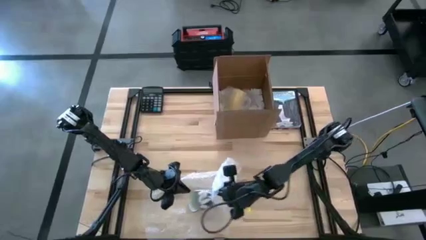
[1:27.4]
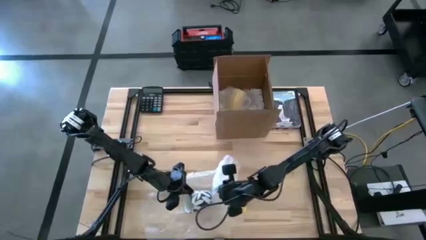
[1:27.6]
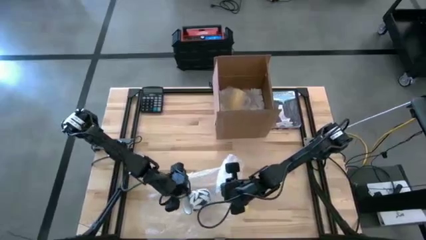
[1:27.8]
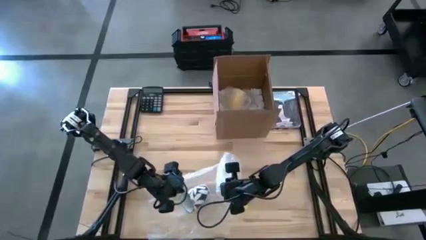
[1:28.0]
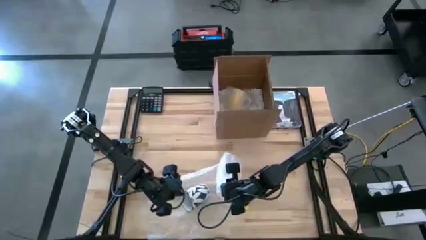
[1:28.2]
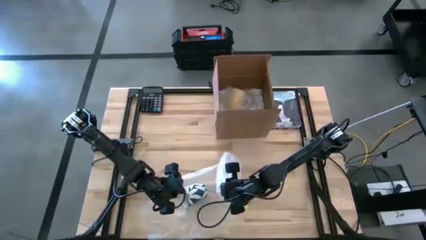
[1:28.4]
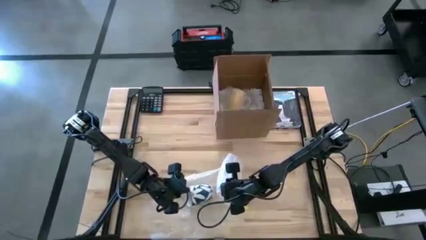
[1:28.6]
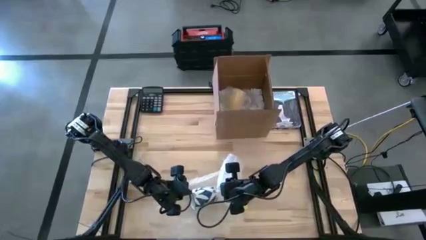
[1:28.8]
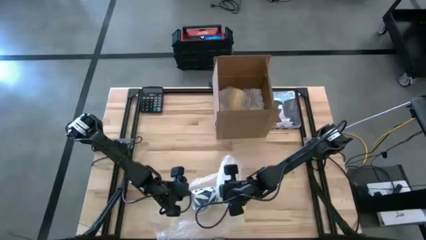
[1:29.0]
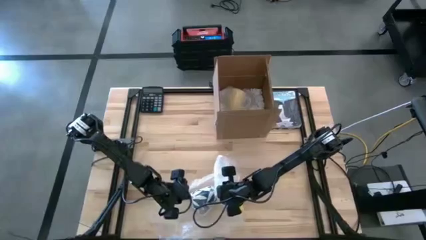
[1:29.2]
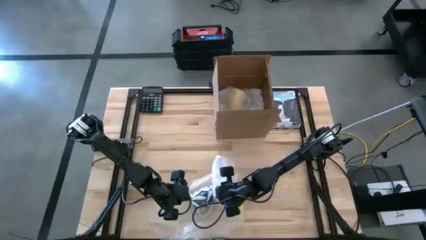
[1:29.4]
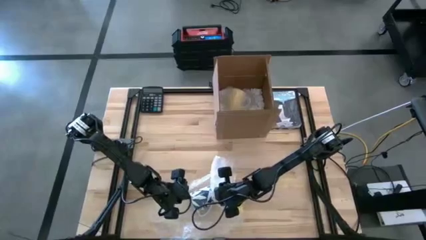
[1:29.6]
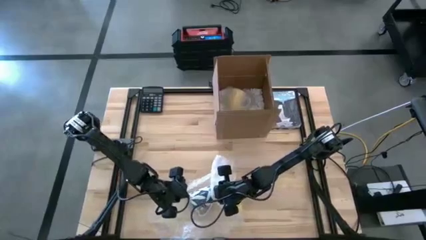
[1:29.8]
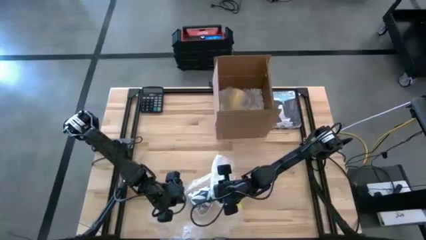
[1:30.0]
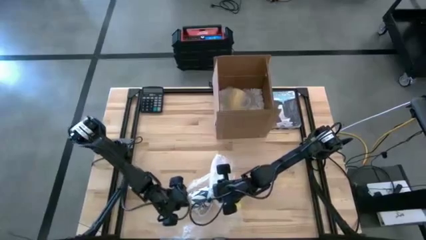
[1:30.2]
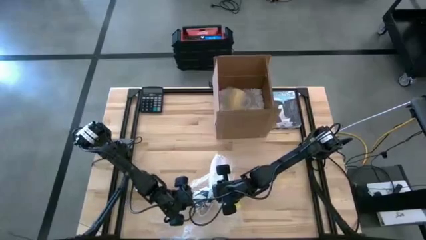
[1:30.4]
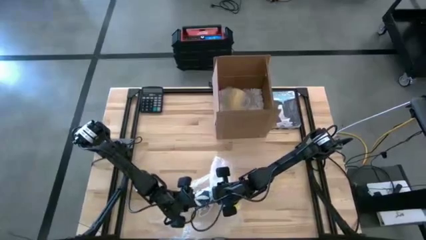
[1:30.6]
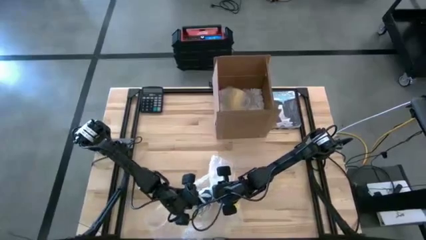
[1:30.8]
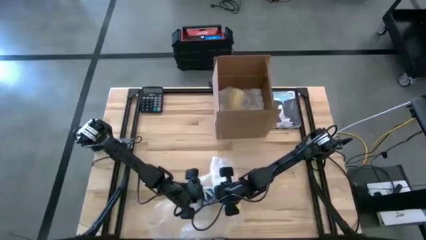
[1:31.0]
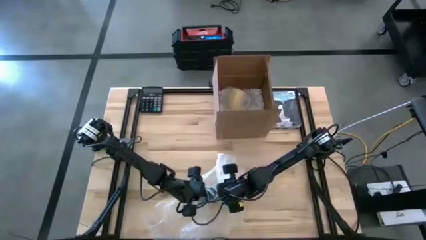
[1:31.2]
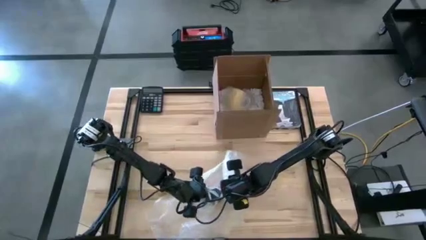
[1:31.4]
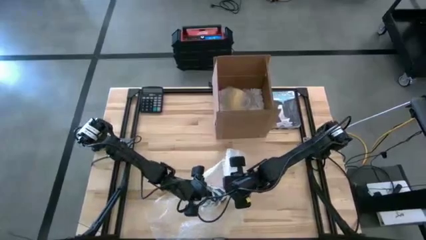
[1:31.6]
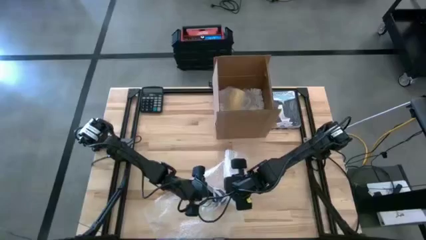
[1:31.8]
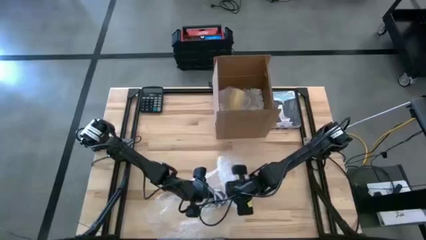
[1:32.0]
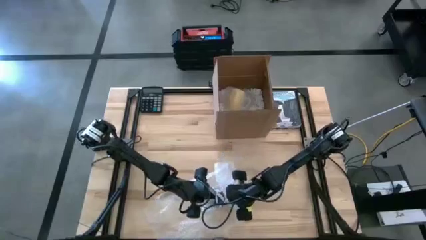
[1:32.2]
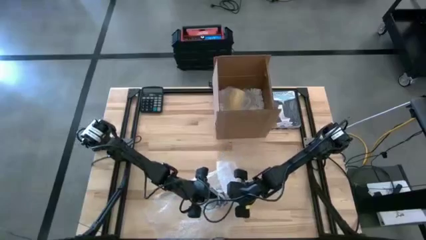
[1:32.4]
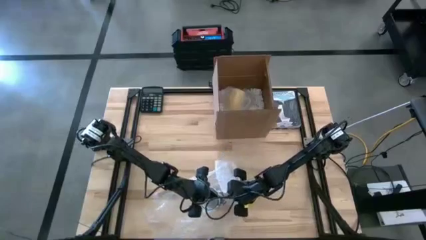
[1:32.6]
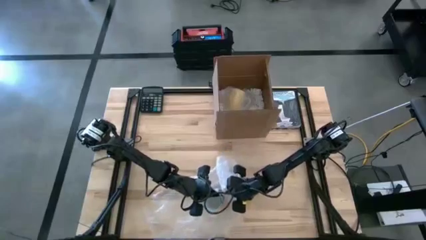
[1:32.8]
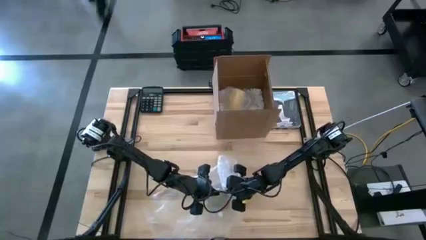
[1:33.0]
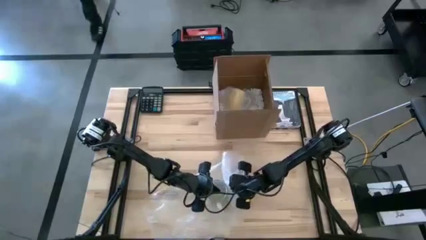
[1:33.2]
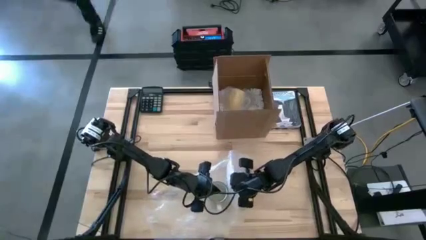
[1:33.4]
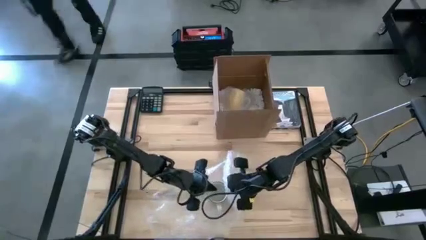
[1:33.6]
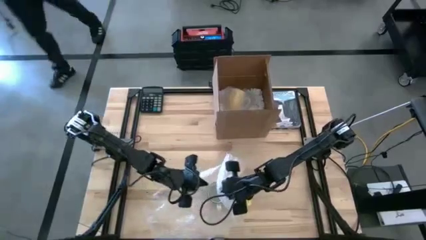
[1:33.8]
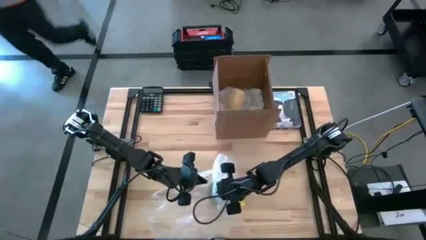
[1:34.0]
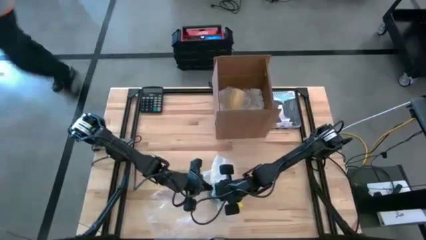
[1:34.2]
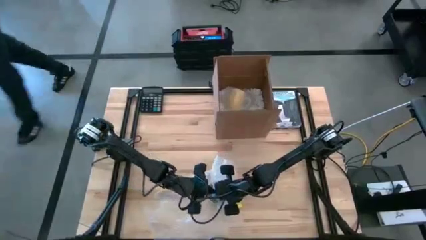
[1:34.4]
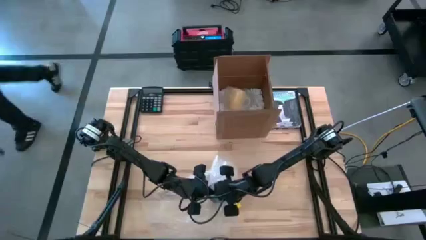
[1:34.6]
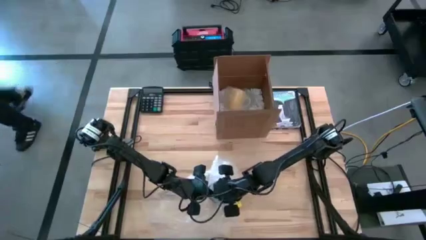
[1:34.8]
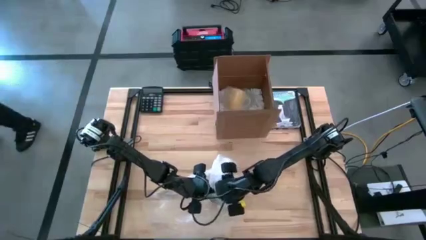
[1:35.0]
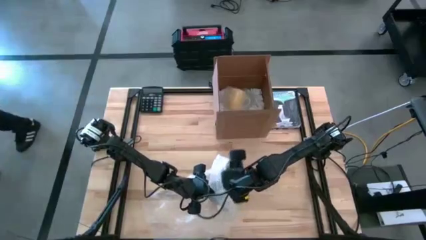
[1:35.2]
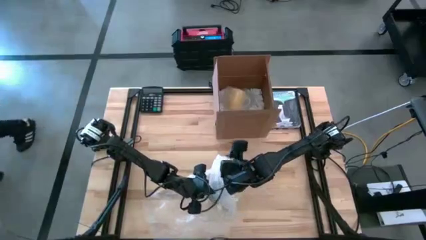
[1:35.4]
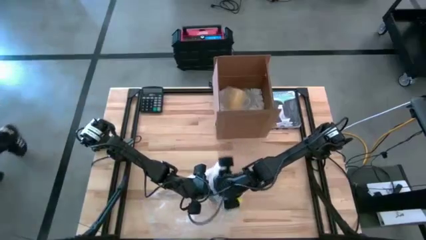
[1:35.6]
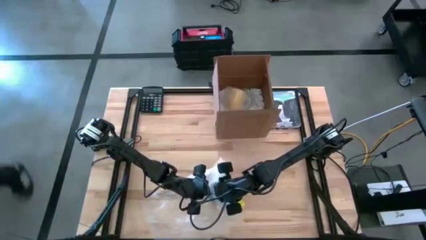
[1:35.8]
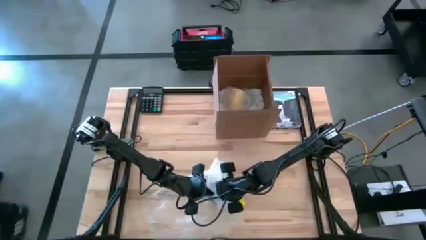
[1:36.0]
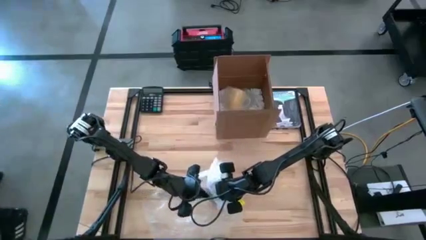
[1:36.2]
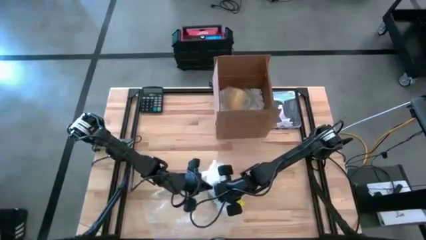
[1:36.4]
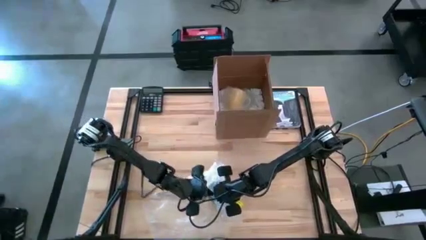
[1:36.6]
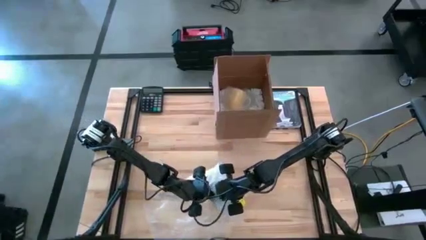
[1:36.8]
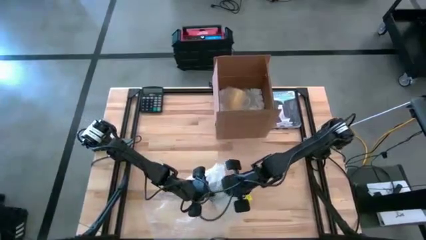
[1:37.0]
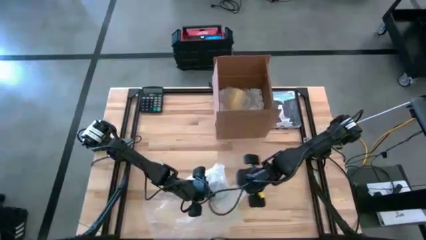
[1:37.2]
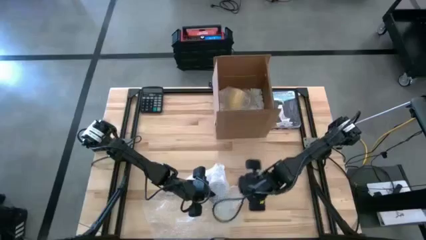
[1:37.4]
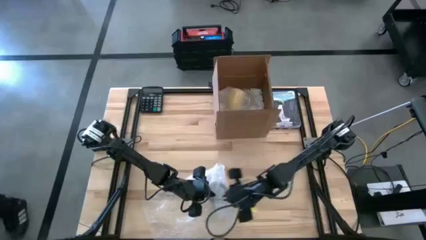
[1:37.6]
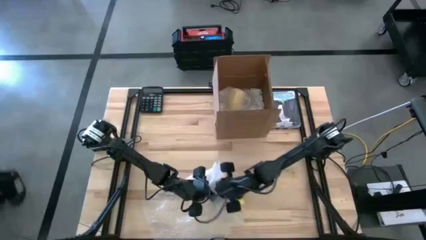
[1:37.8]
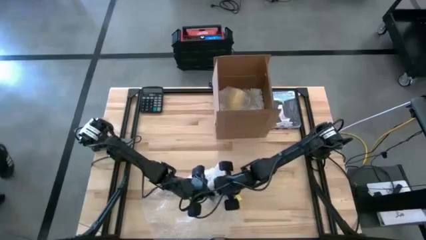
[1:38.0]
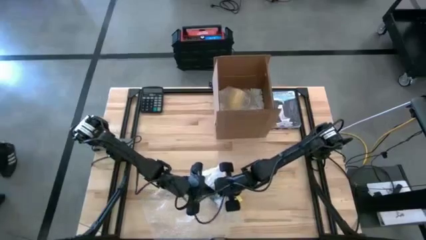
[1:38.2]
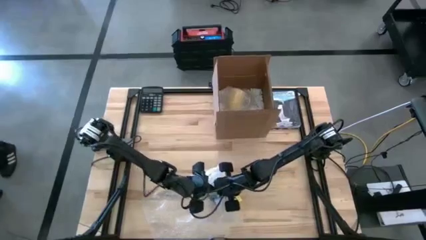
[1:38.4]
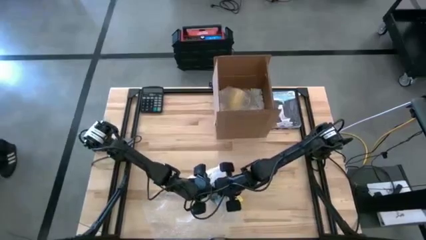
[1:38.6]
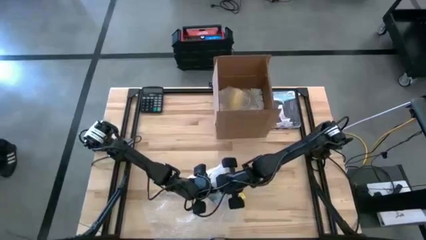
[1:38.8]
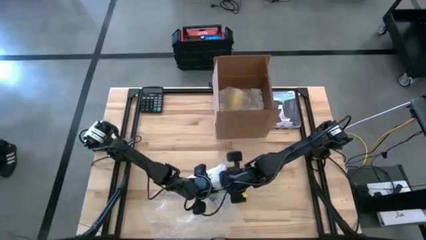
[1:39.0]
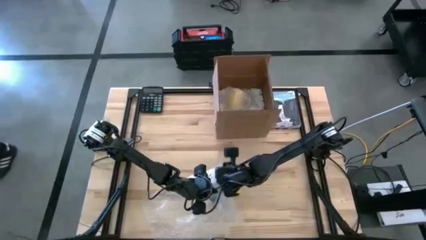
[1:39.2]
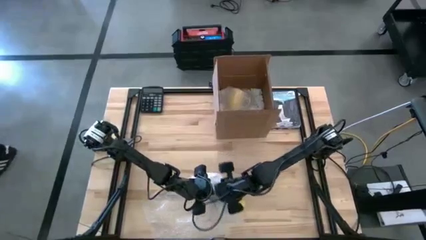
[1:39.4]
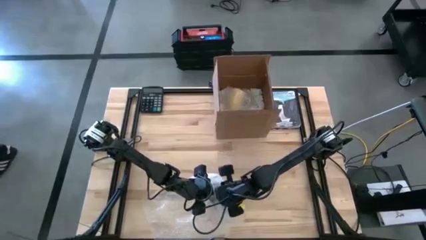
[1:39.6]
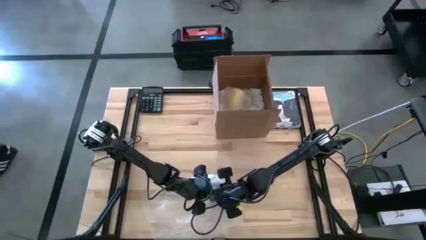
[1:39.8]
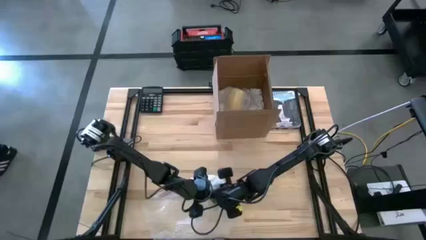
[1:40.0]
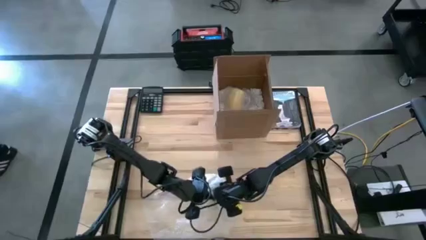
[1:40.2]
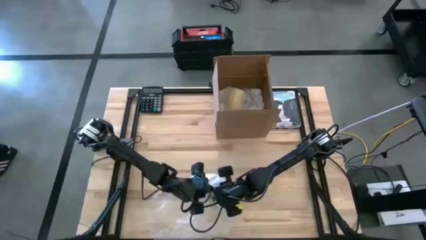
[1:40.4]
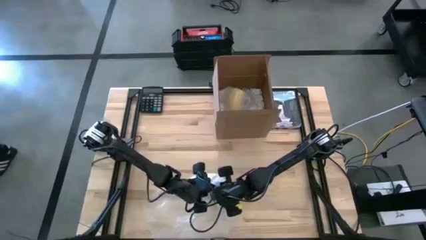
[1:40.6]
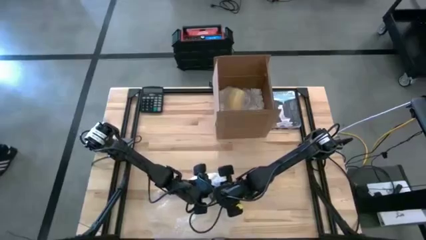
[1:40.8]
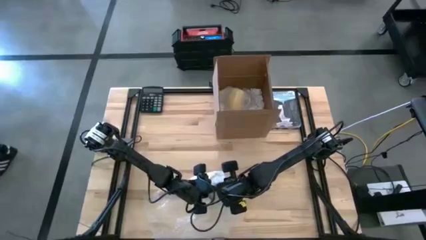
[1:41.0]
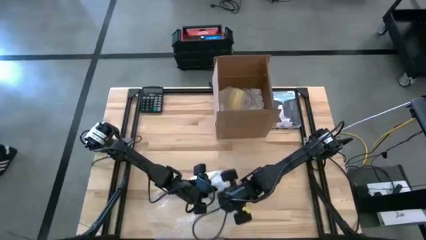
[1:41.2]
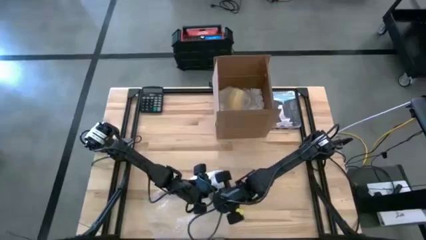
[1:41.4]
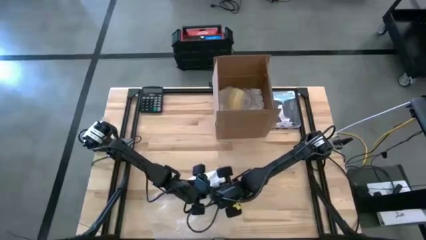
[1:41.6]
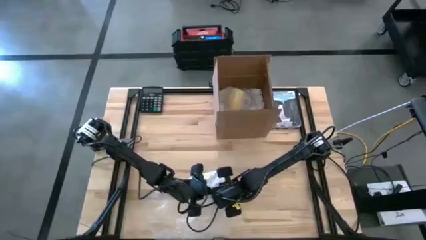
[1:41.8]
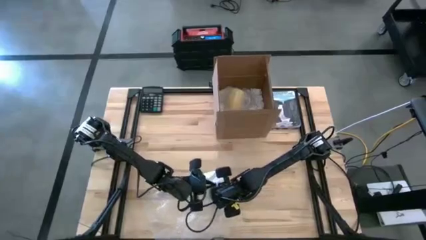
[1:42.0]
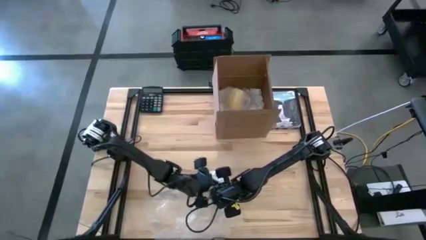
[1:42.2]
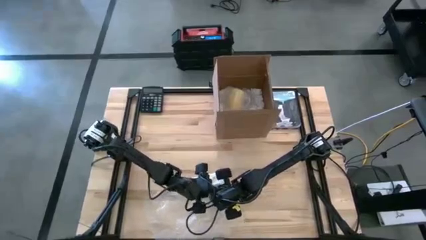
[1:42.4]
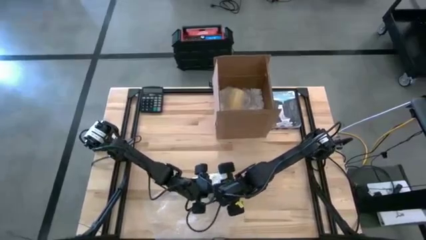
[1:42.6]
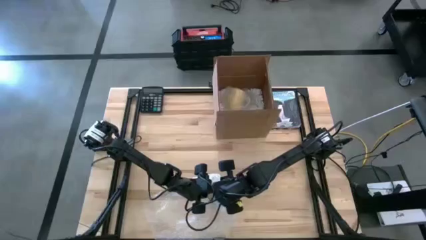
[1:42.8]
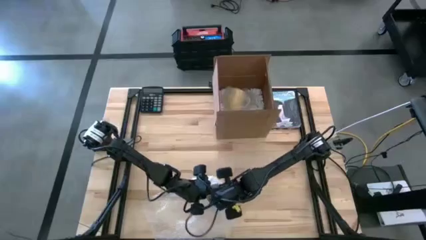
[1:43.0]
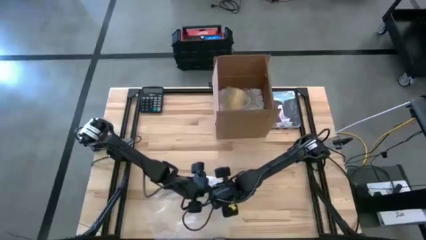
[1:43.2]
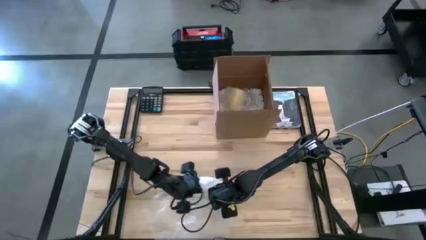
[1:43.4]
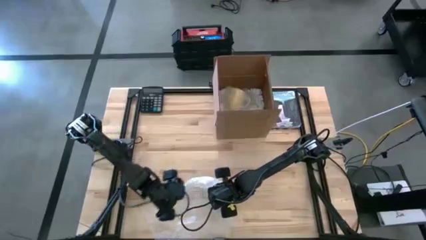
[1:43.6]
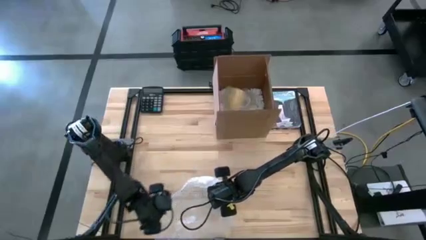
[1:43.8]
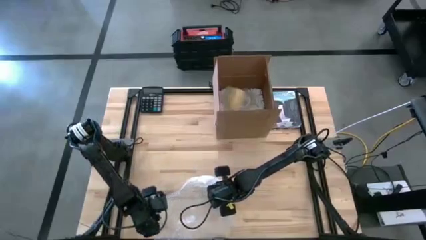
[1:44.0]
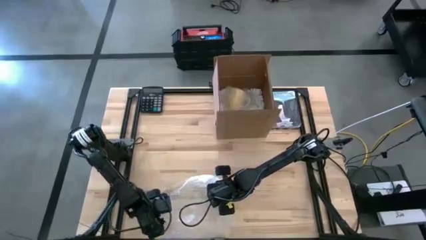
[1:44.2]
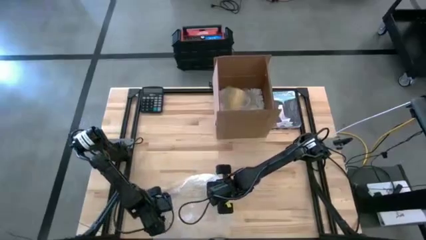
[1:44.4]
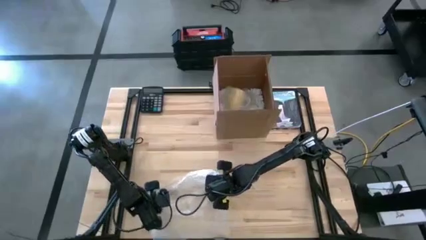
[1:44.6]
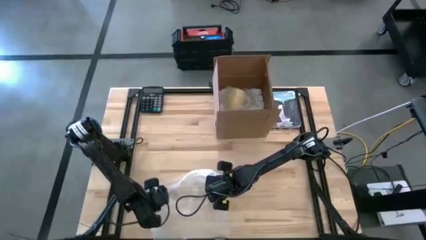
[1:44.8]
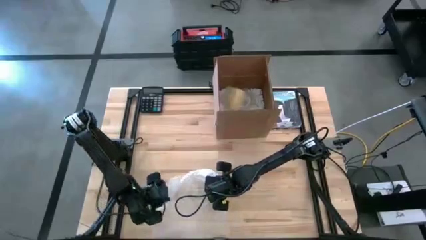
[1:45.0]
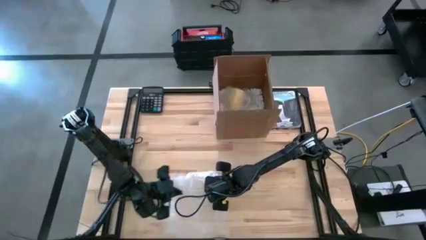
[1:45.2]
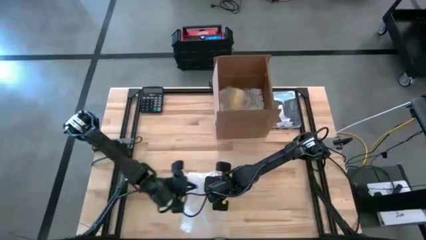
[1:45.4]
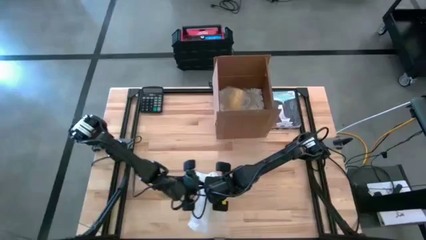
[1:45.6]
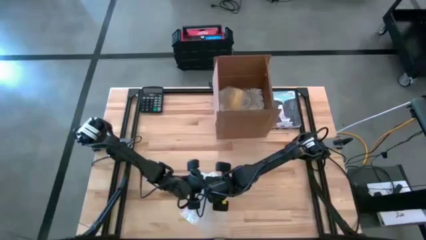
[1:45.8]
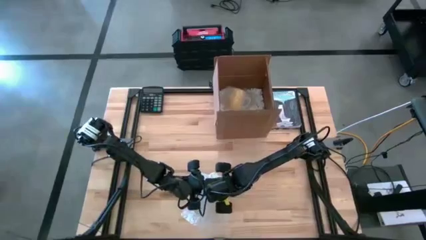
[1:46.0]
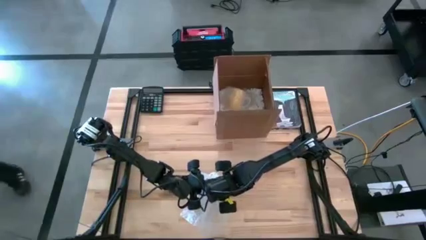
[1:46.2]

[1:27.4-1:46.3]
Task: wrap mug
Wrap the blue patterned mug with the transparent bubble wrap
